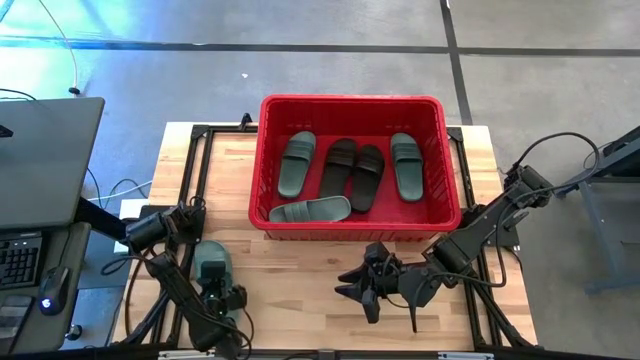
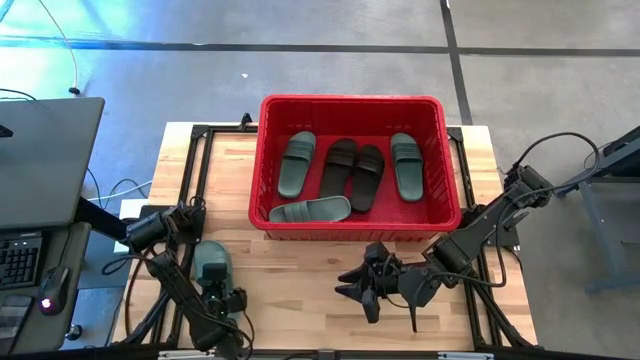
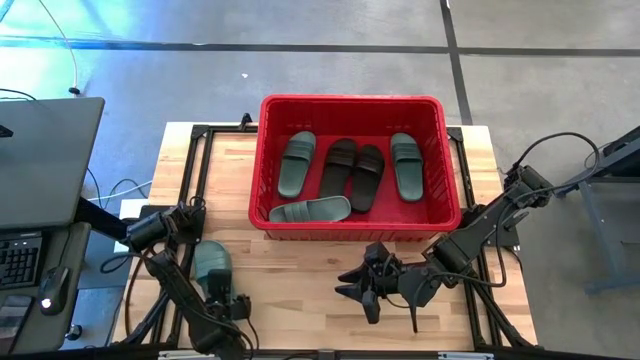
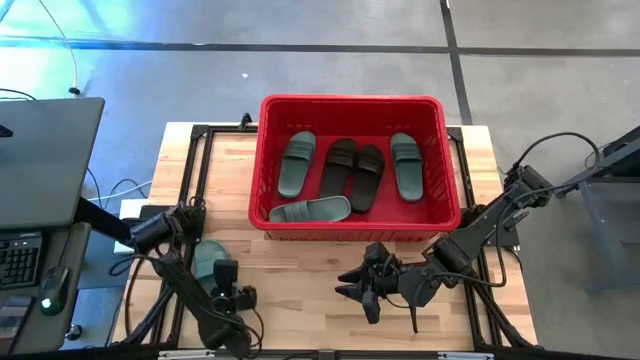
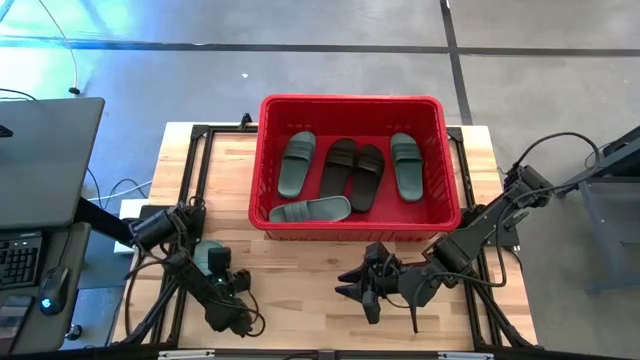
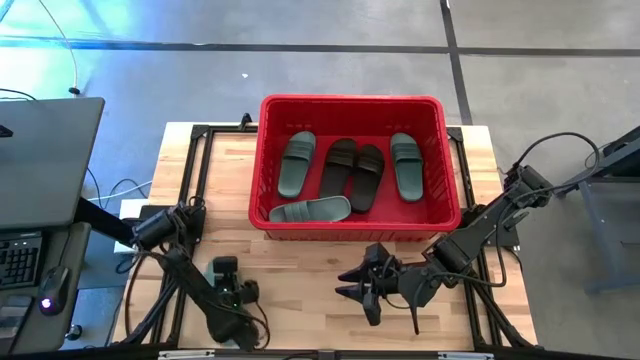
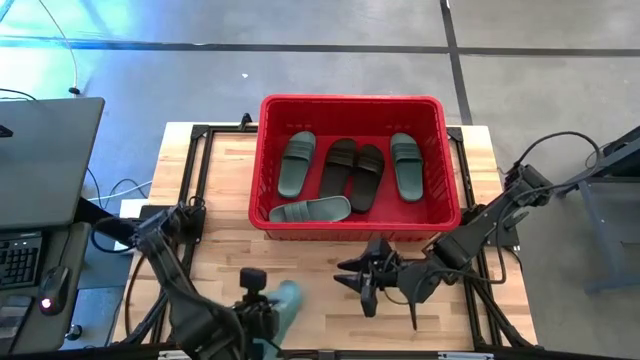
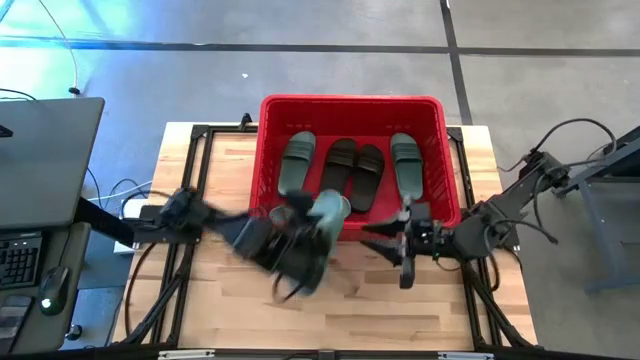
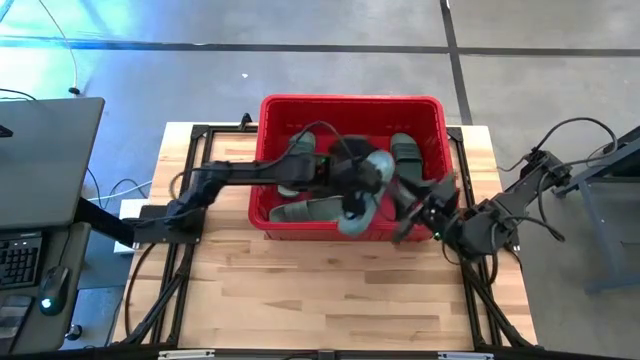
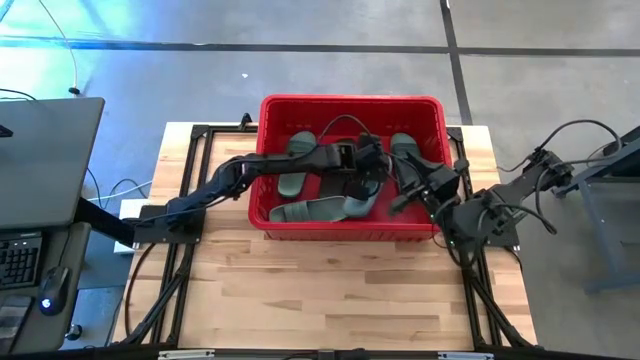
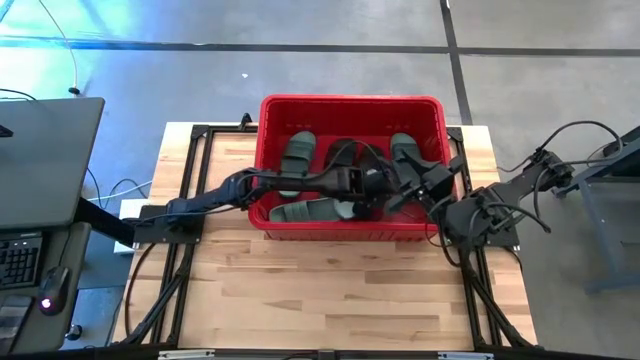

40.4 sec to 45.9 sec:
Task: Pick and place slides into bin
Put the green slide in the red bin

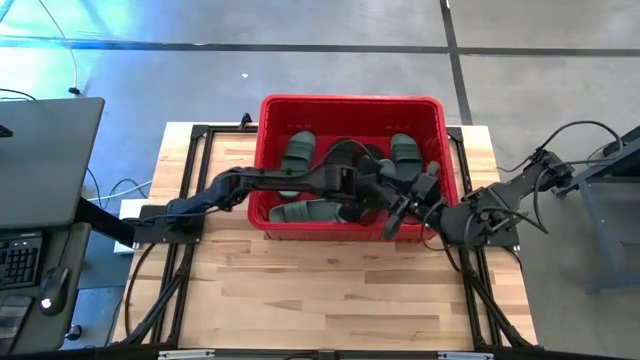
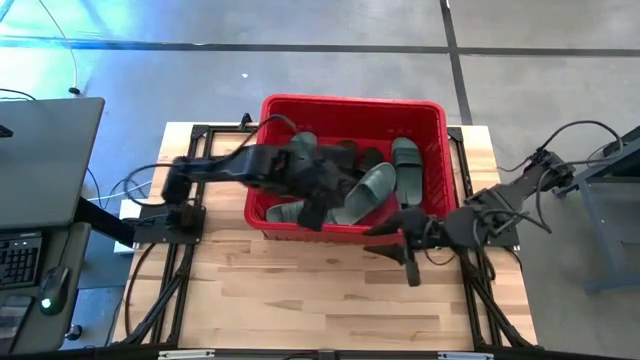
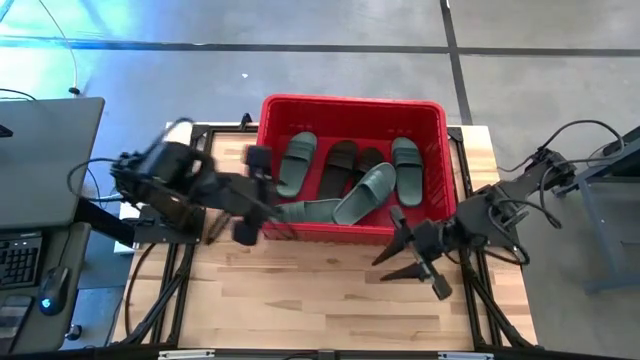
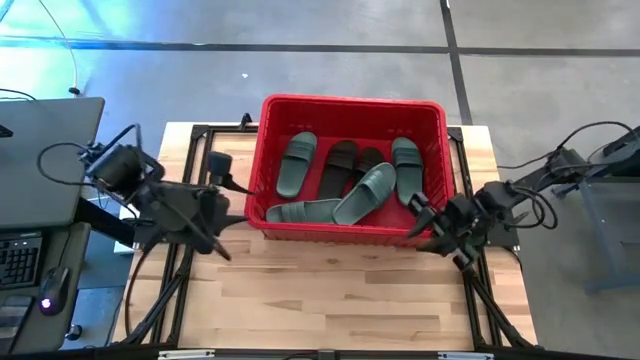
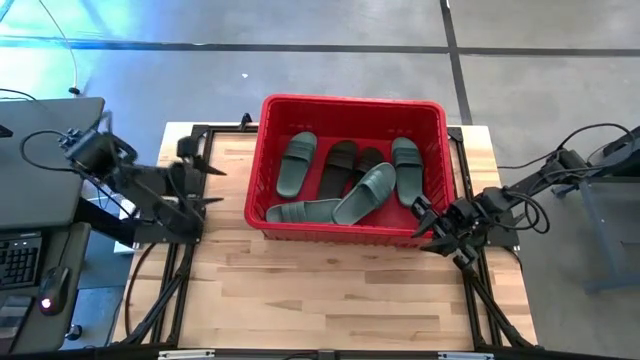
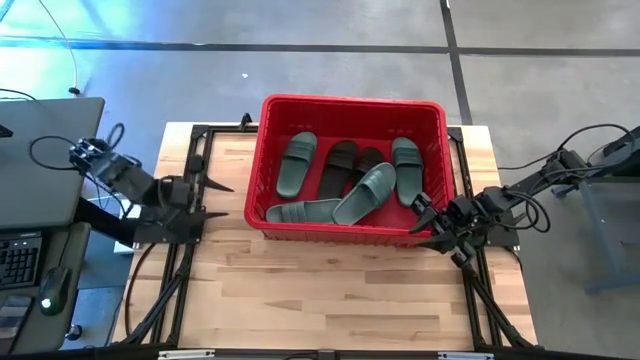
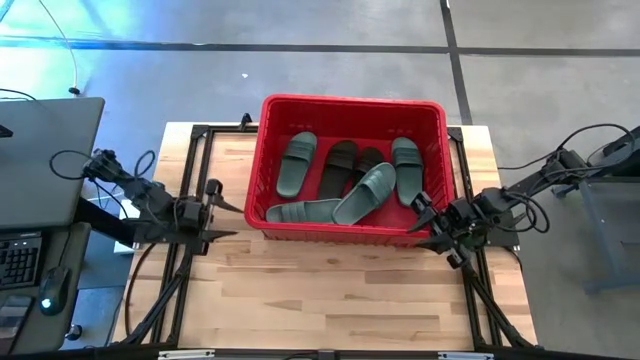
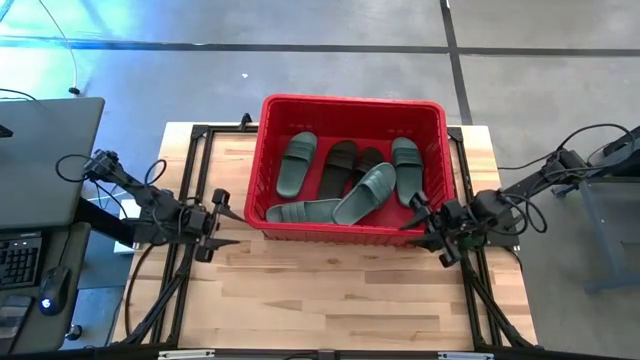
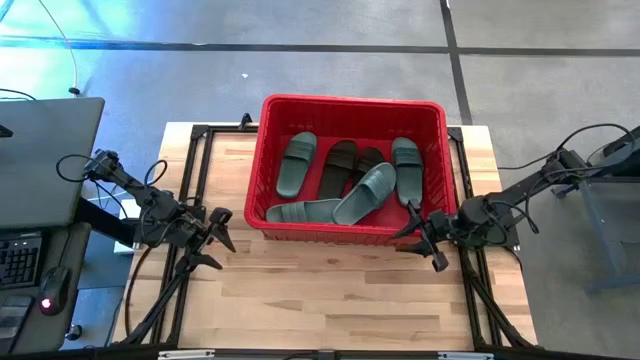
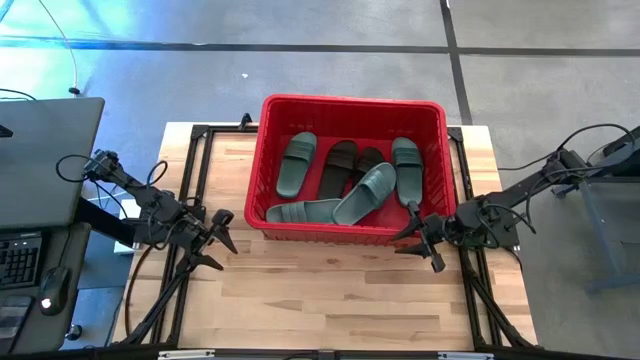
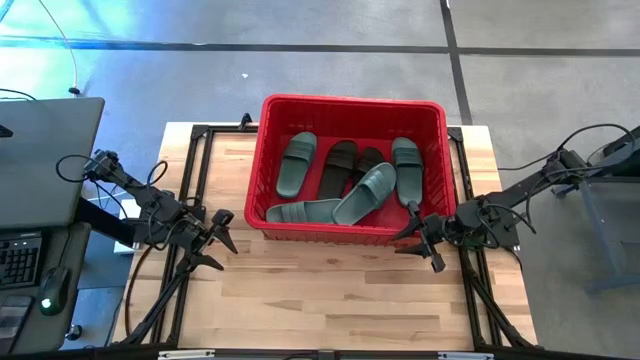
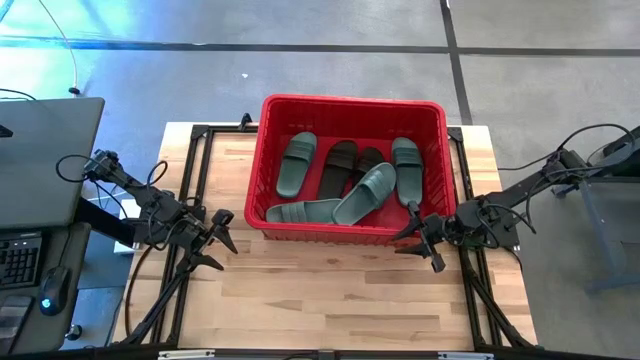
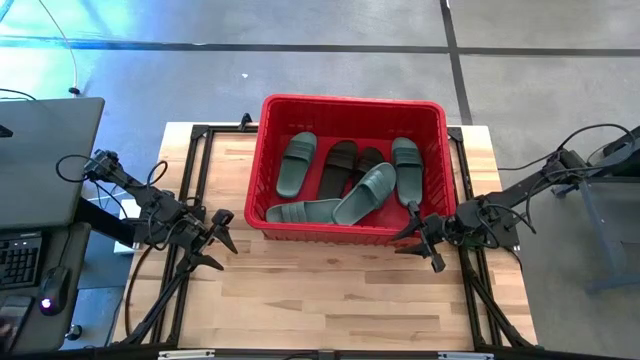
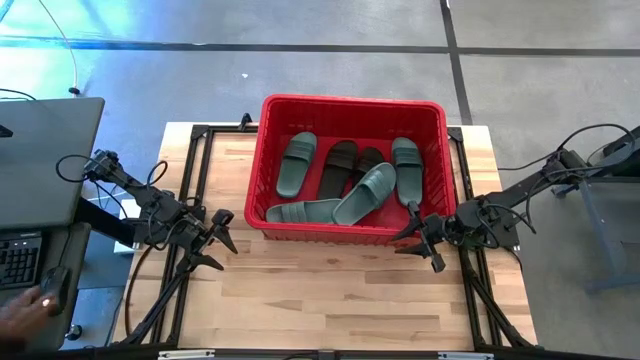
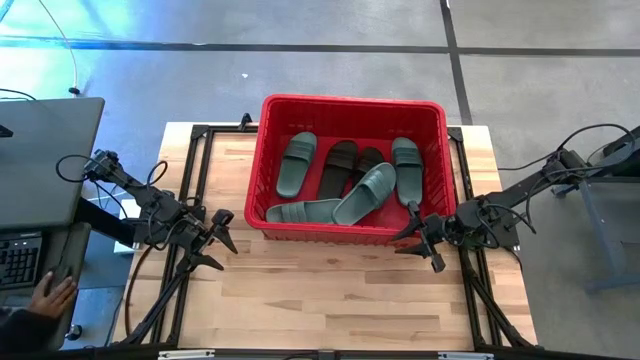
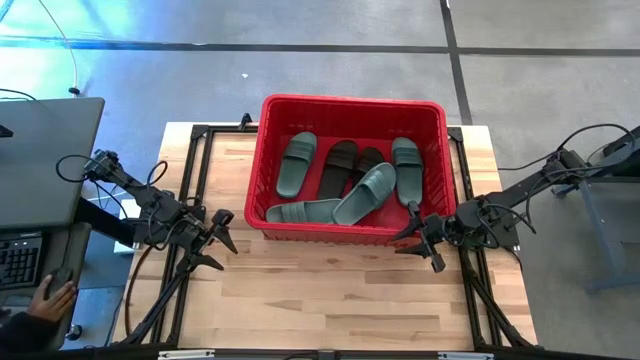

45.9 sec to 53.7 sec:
Return to Home Position

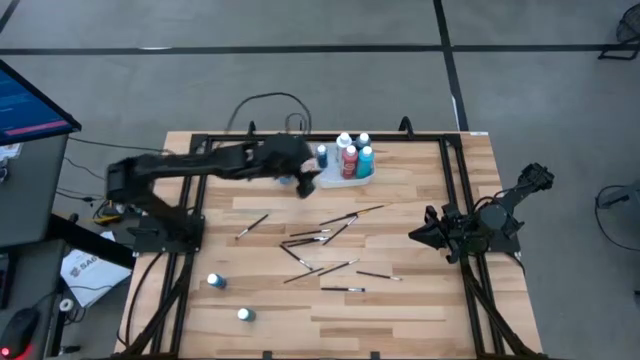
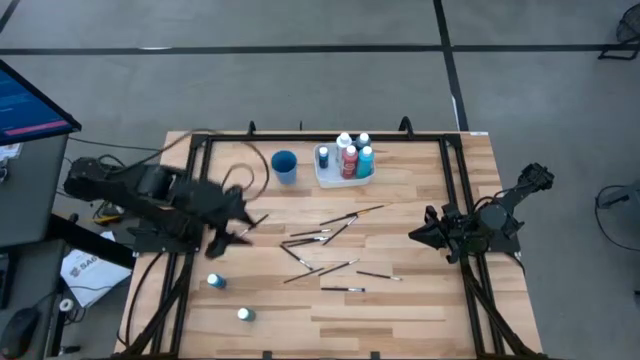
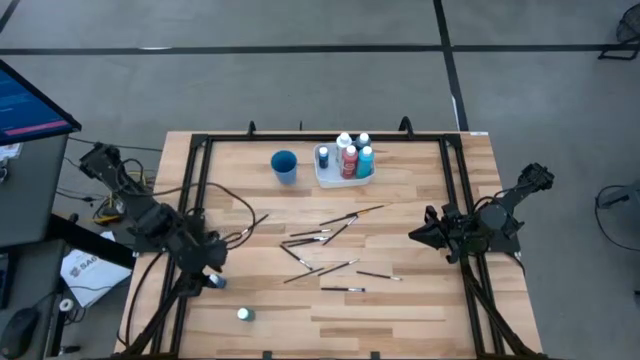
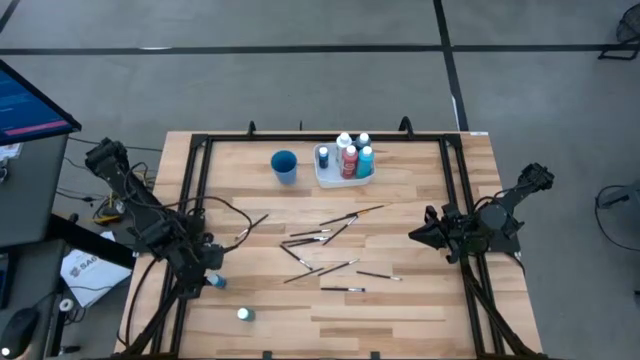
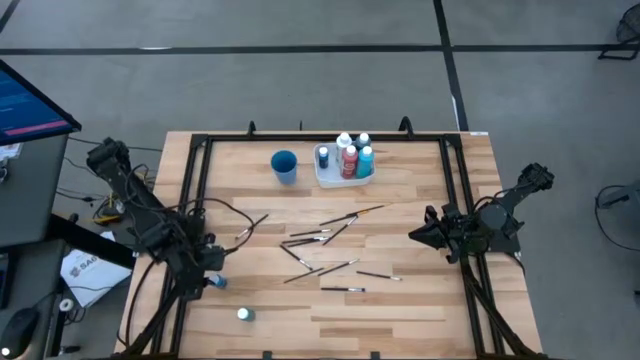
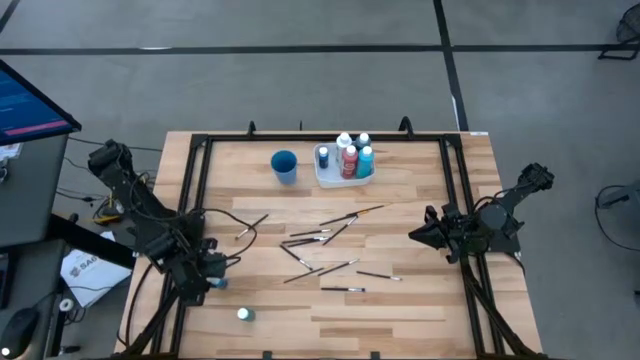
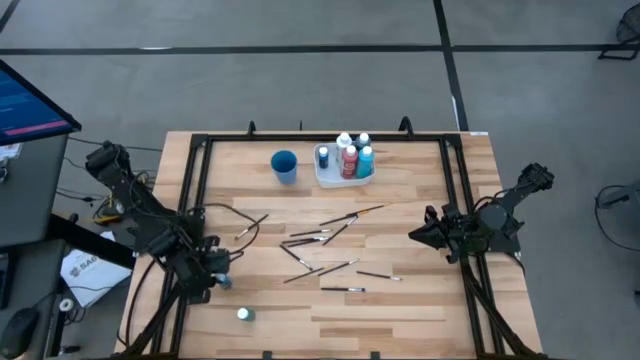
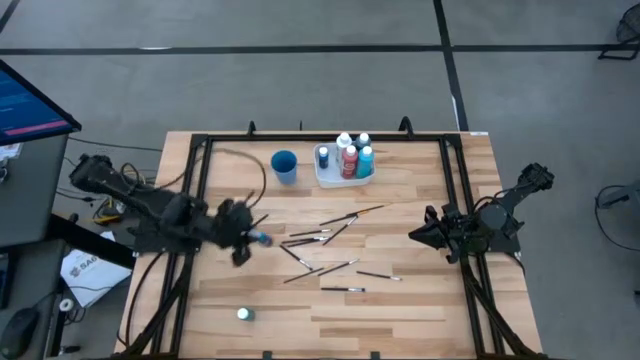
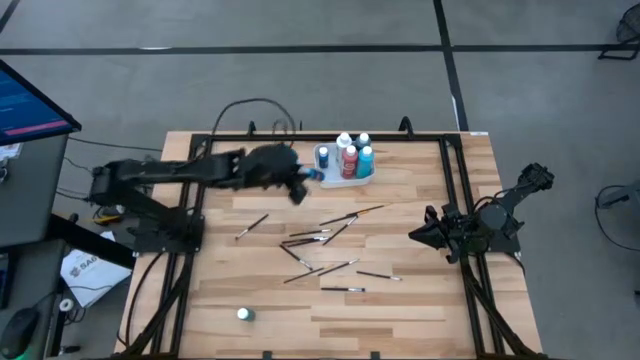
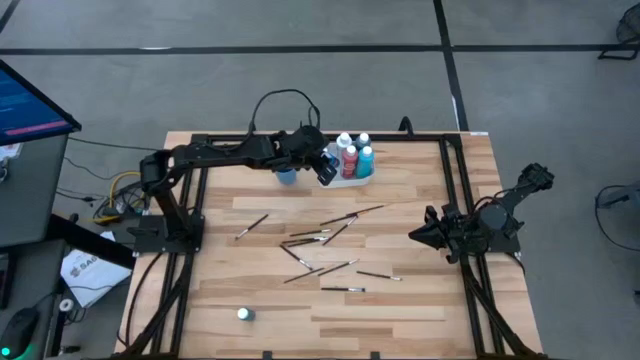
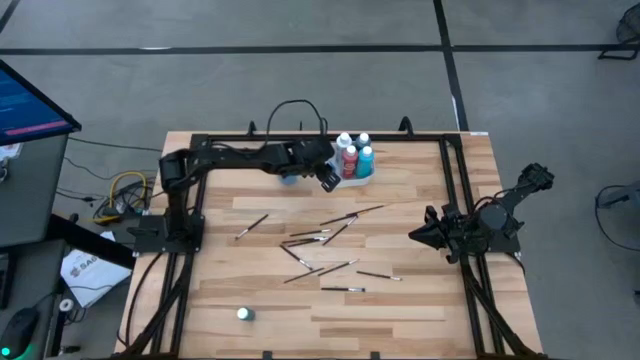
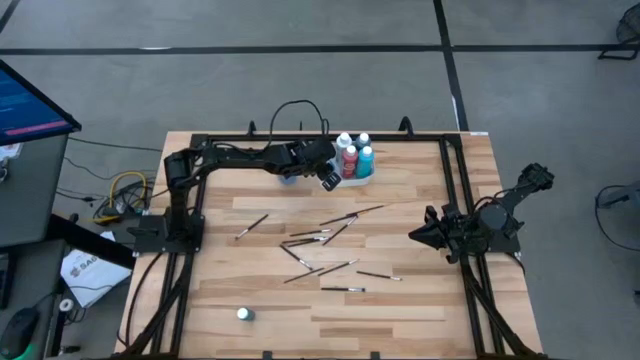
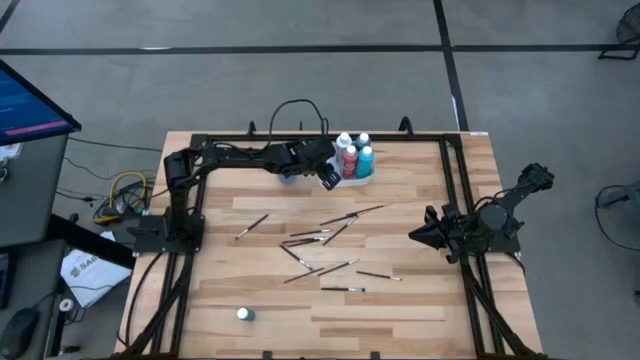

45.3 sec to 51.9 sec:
Task: Pick & Place Paint Supplies
Put the blue paint bottle into the white bin
